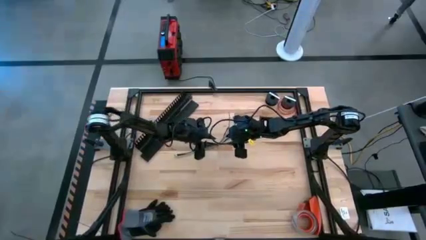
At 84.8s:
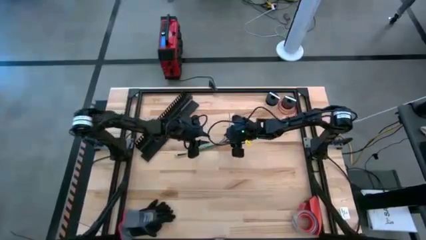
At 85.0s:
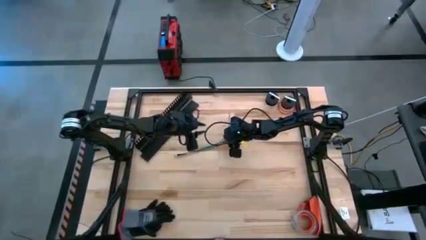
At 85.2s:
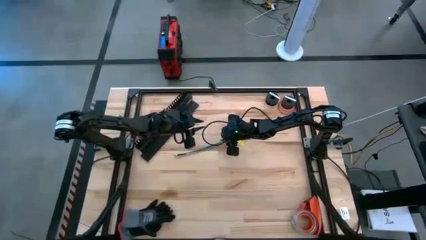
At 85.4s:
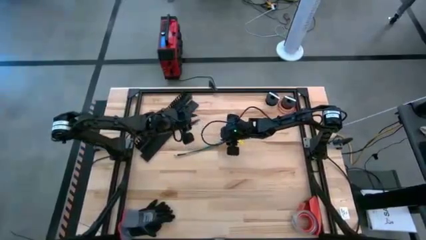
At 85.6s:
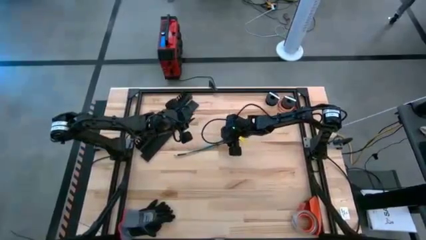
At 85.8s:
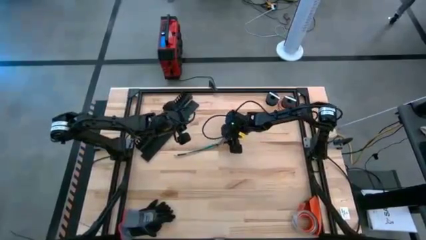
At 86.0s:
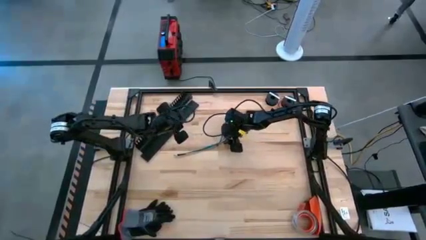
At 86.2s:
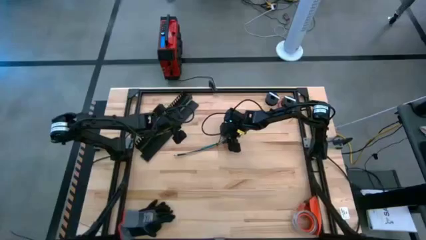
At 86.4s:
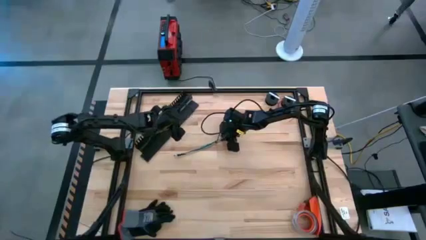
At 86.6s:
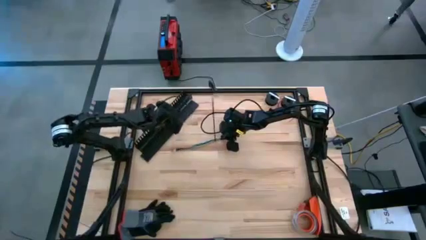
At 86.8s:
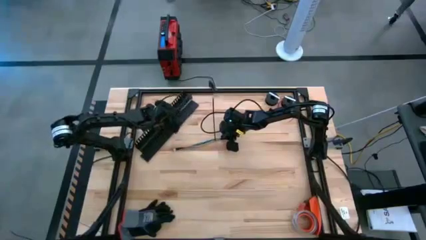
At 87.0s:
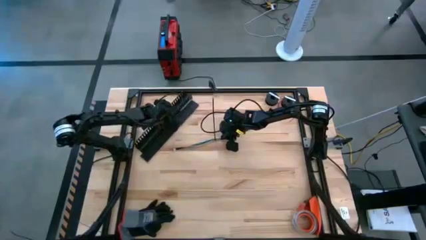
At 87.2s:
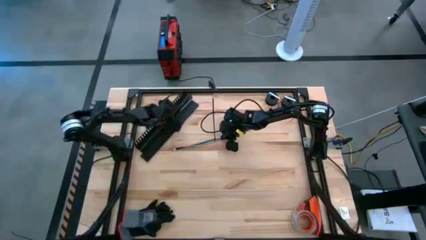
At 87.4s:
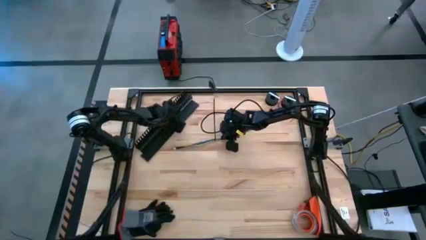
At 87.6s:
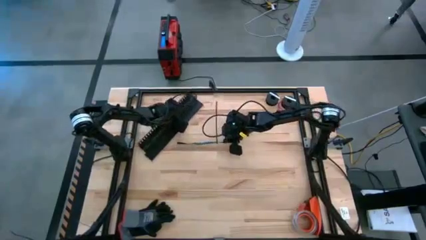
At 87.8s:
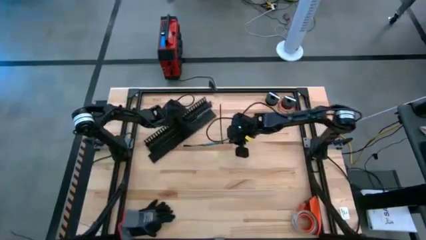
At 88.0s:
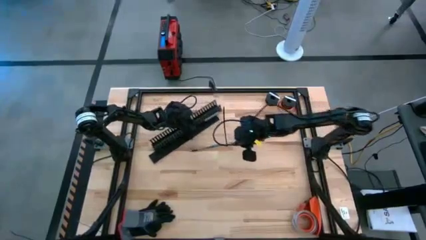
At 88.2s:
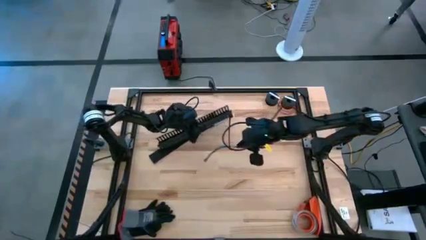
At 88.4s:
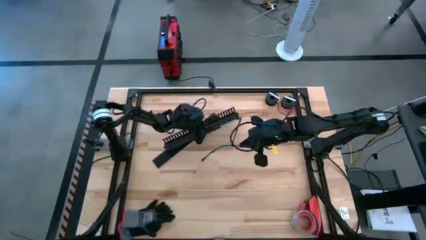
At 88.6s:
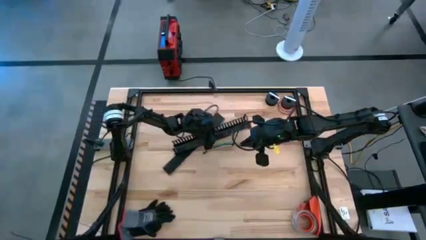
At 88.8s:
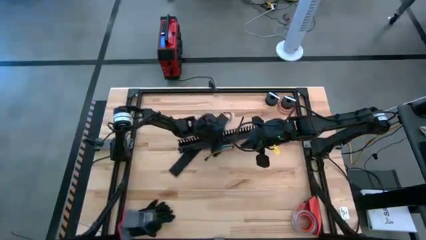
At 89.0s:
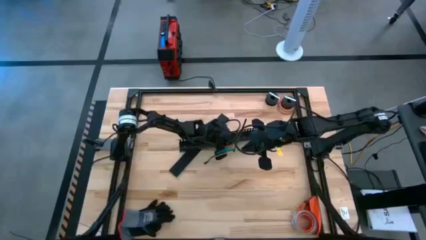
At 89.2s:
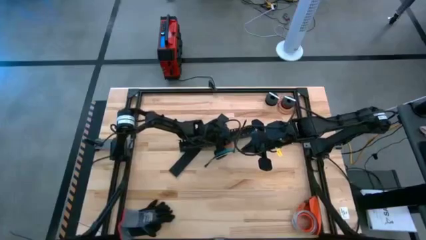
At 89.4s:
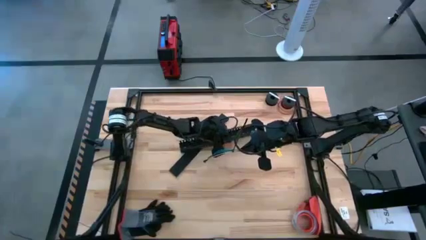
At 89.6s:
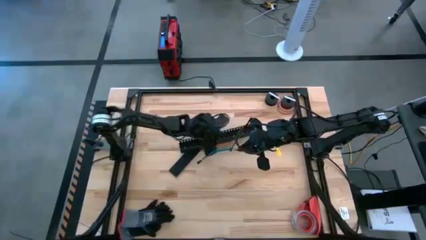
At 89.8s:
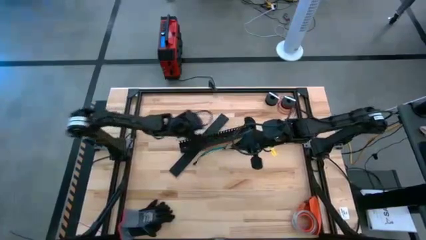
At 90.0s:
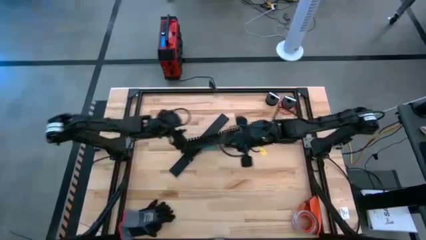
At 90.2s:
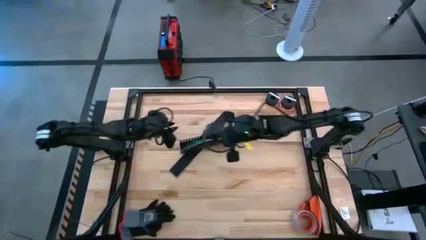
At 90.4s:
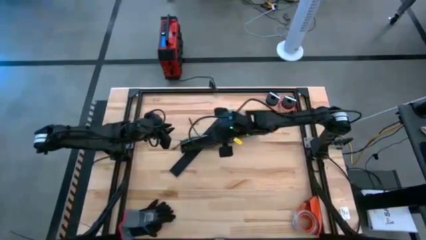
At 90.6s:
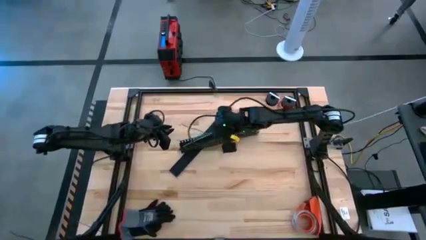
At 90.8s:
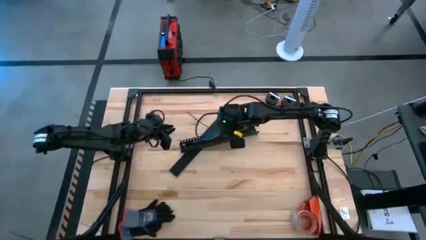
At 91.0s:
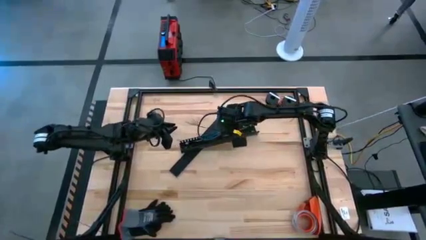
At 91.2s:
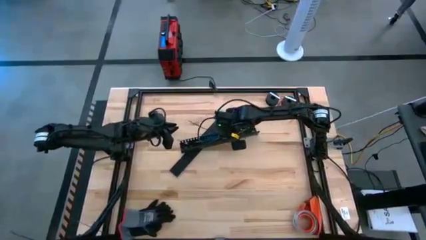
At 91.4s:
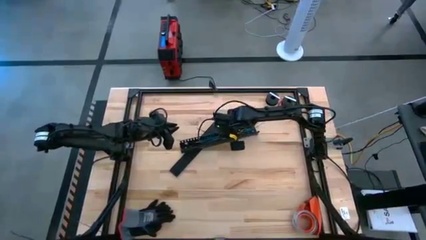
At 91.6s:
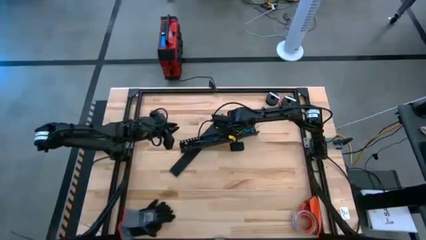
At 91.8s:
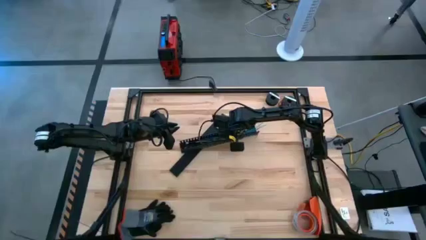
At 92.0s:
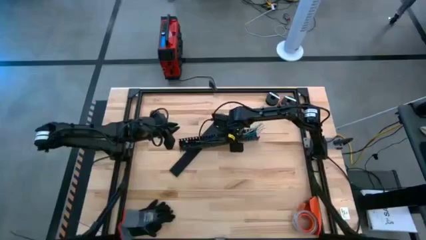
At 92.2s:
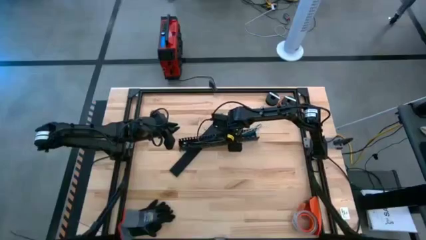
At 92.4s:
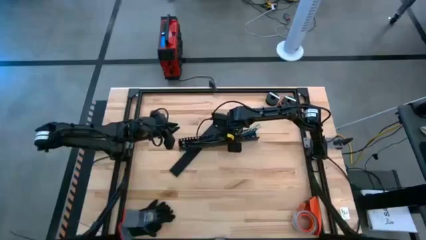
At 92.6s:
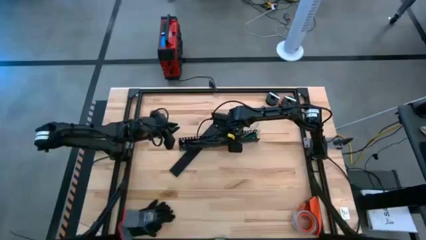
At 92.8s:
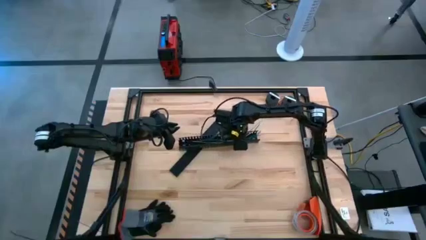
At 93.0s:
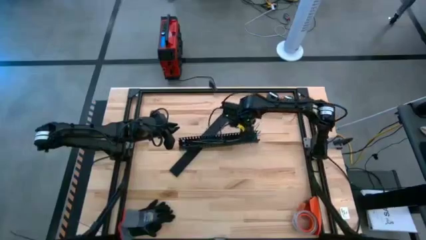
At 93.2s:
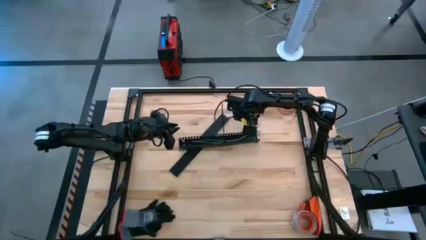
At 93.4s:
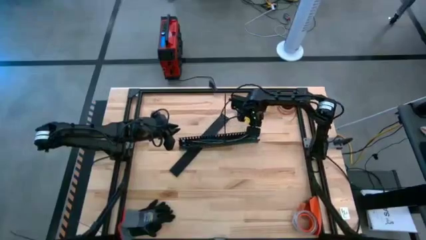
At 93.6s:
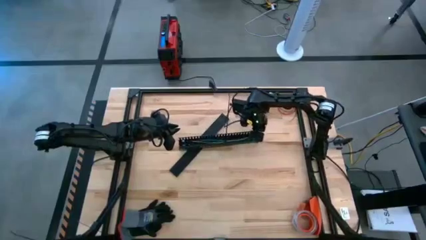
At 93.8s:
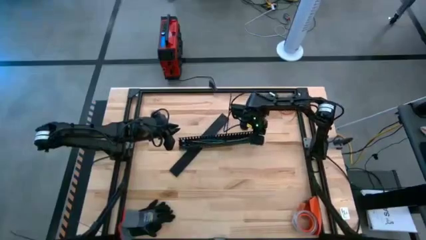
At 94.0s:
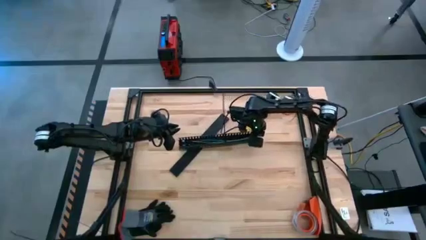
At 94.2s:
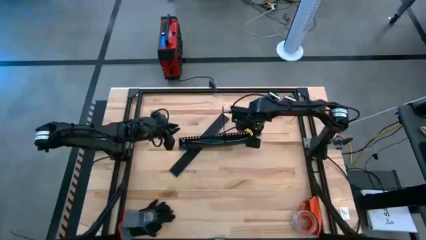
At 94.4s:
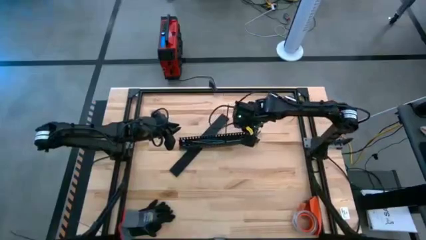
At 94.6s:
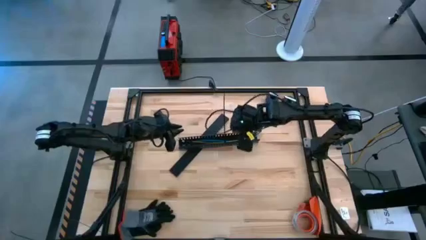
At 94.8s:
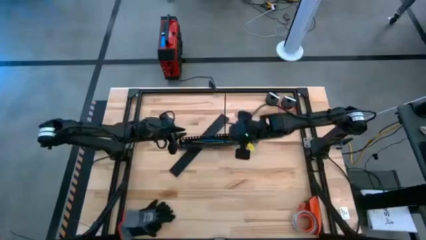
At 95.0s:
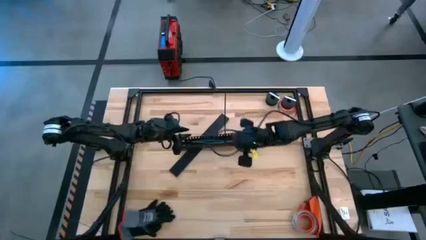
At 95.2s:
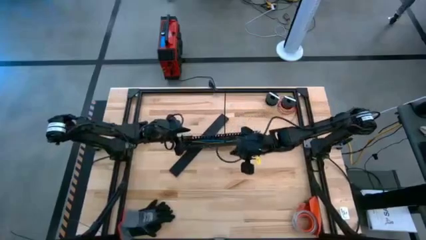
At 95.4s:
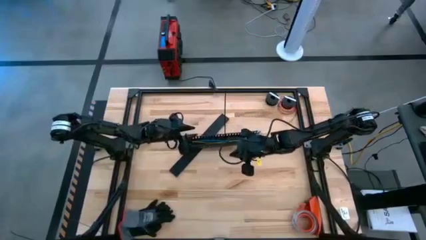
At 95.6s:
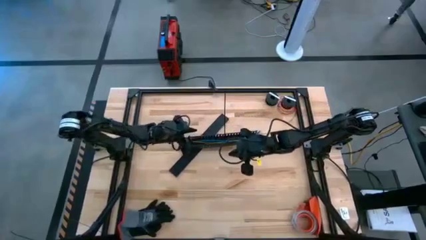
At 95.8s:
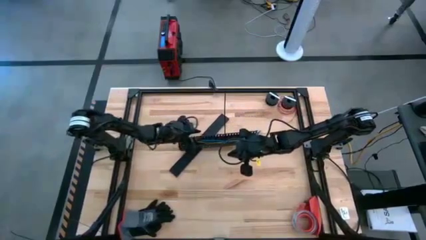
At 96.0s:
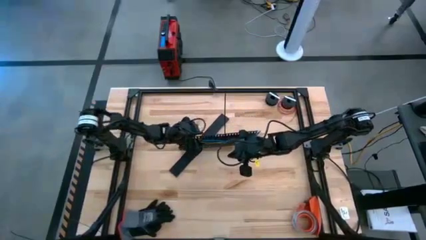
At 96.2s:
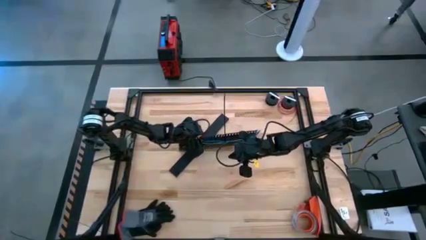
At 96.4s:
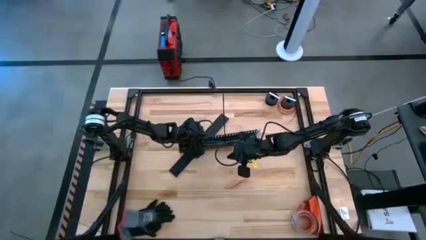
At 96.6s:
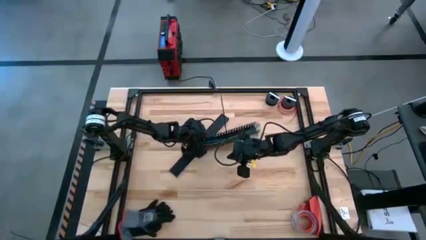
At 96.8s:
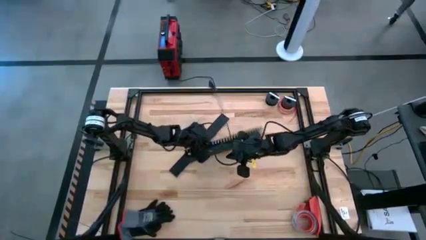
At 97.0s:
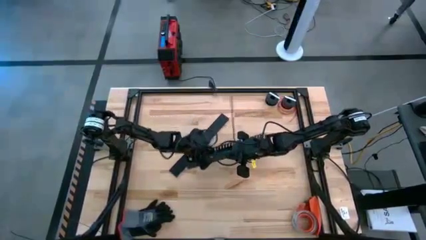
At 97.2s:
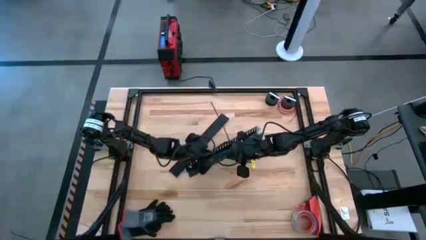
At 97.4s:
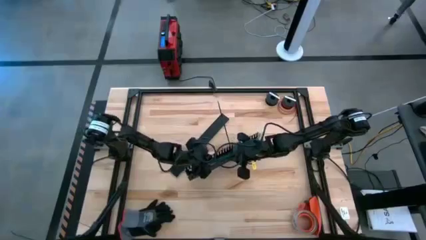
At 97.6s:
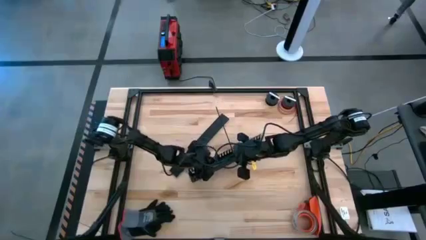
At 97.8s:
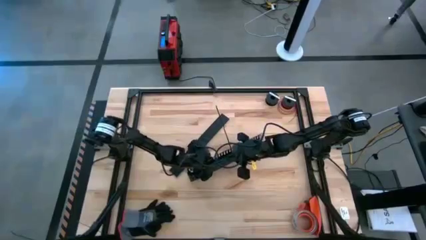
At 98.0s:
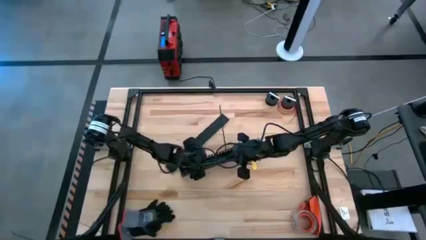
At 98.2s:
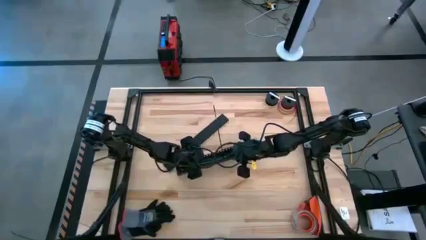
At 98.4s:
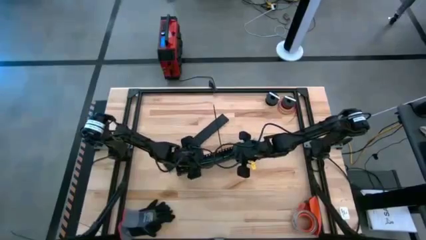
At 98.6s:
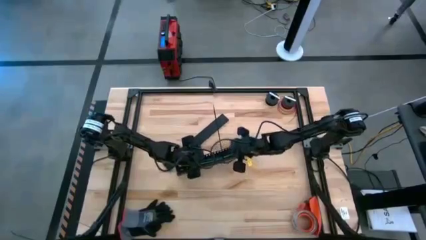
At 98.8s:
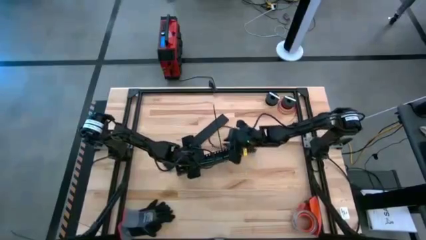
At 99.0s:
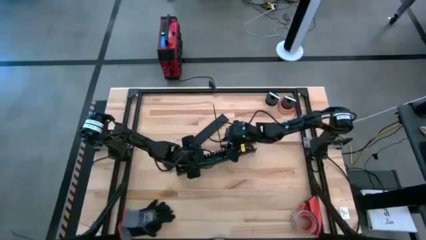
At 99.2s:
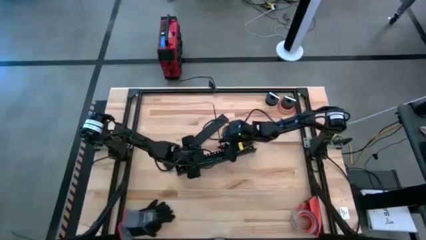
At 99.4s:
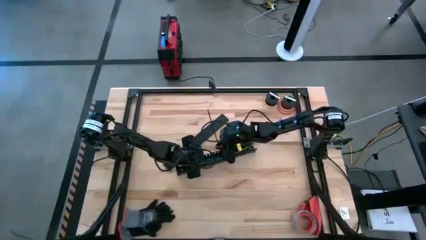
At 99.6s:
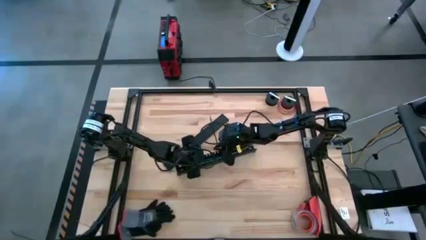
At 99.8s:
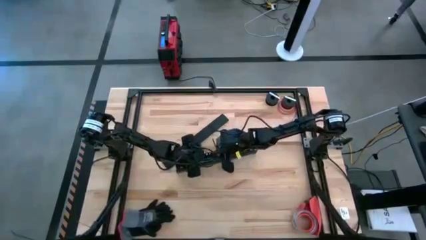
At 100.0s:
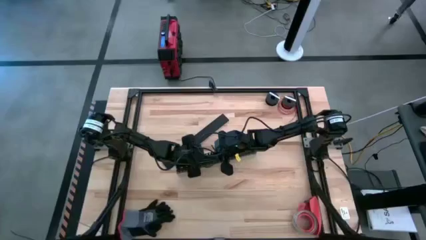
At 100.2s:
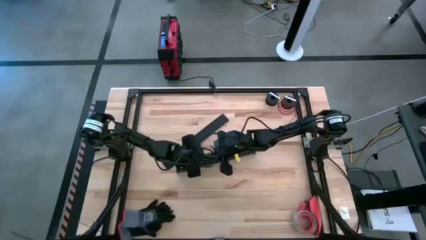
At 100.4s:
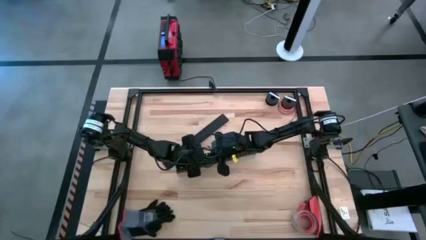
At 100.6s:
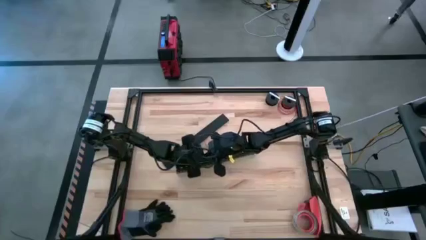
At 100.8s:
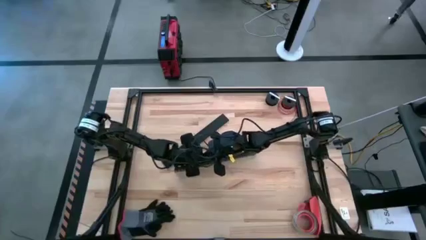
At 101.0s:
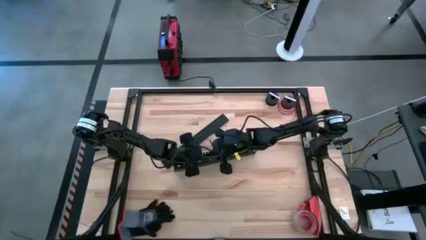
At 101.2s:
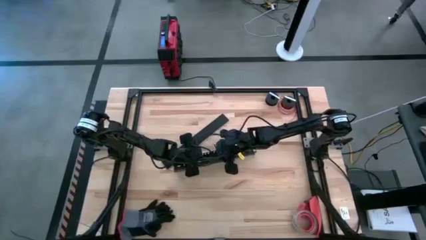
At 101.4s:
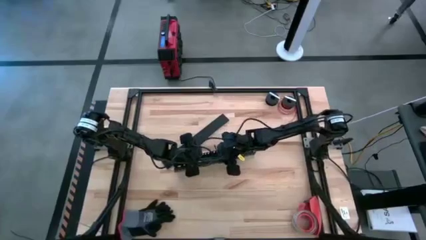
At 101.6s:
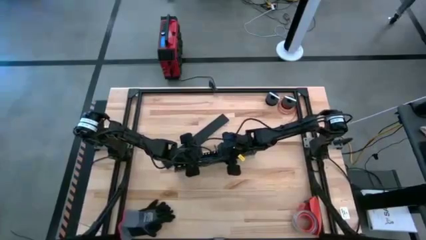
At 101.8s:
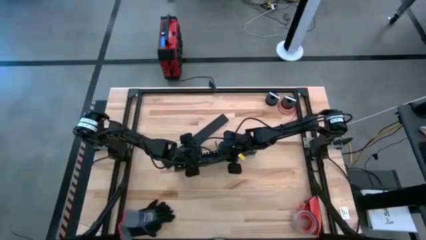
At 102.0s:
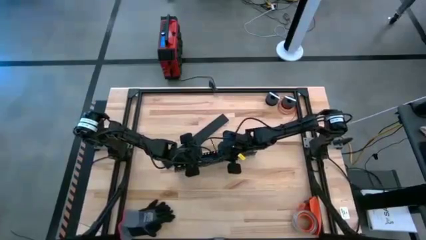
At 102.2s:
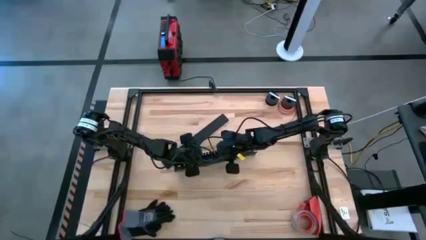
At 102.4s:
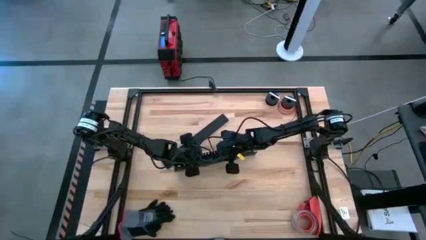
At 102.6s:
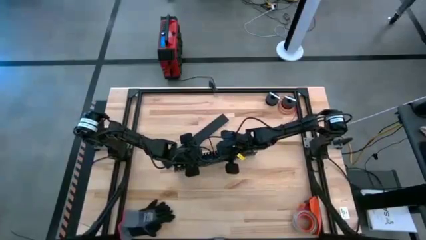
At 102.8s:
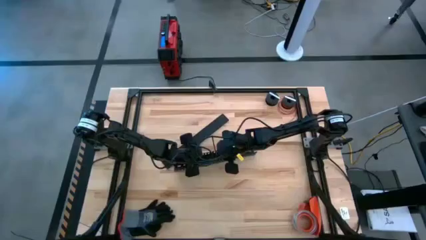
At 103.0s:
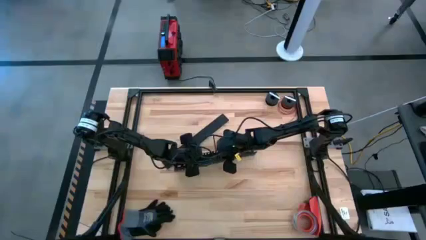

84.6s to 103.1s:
Task: Ziptie cables
Put the ziptied cable wires in a black cable duct
